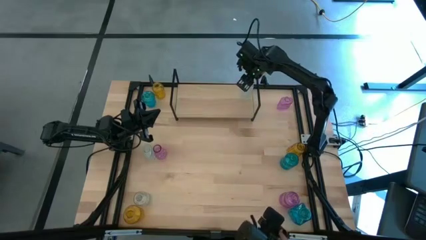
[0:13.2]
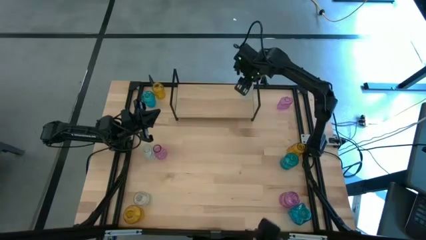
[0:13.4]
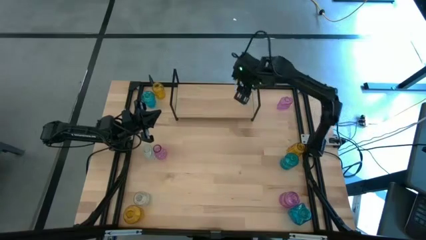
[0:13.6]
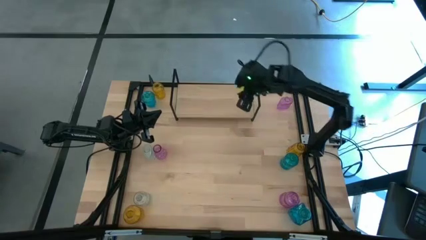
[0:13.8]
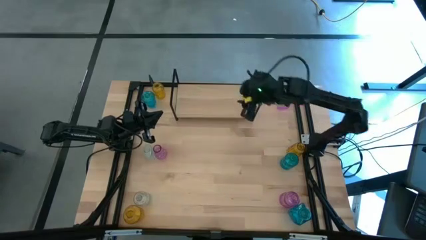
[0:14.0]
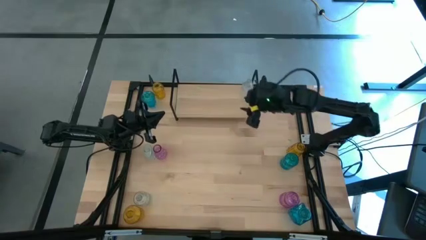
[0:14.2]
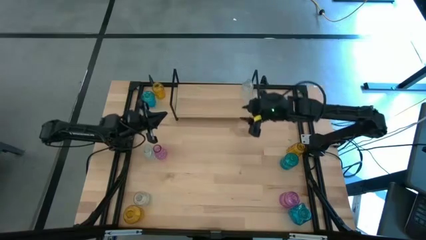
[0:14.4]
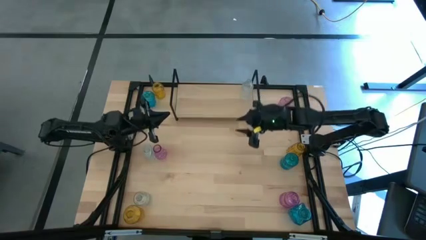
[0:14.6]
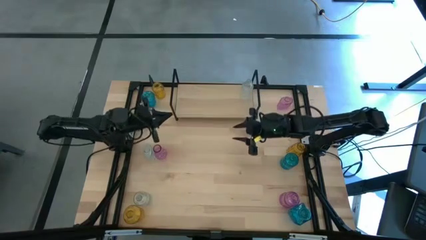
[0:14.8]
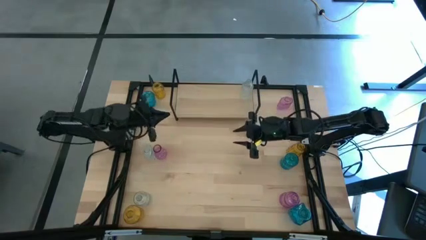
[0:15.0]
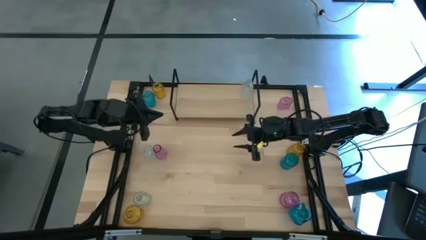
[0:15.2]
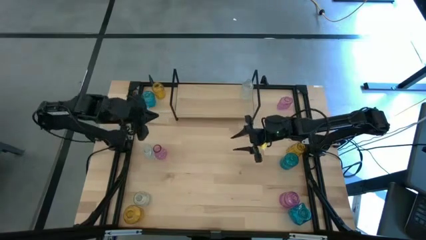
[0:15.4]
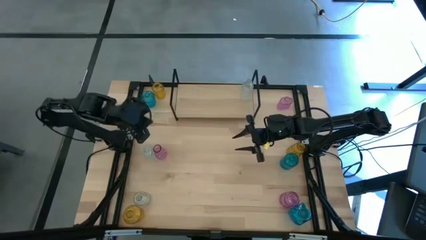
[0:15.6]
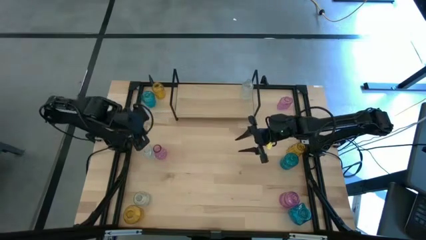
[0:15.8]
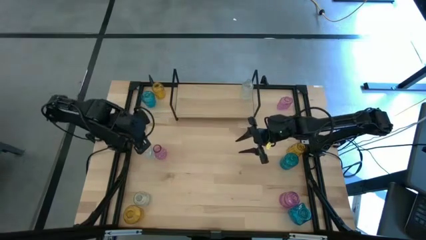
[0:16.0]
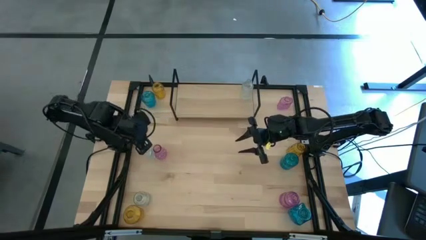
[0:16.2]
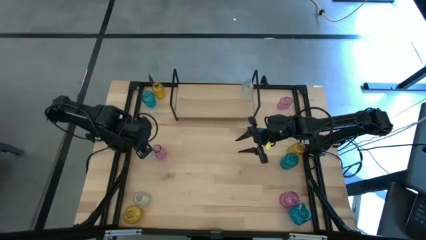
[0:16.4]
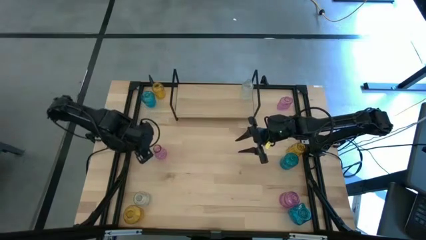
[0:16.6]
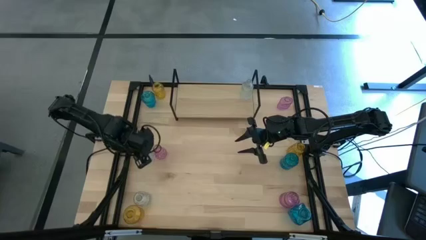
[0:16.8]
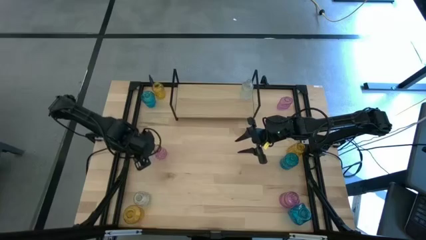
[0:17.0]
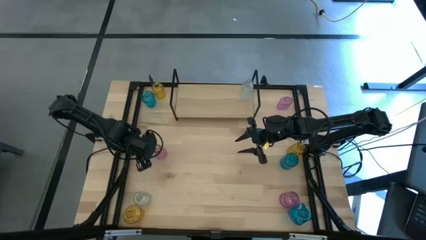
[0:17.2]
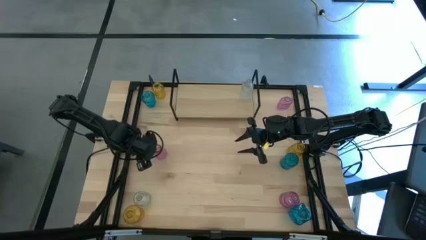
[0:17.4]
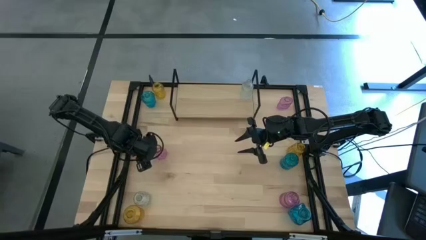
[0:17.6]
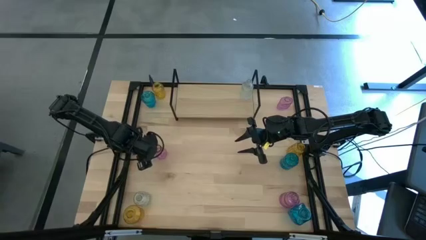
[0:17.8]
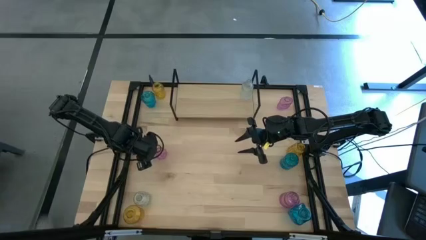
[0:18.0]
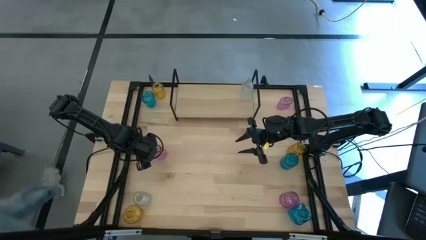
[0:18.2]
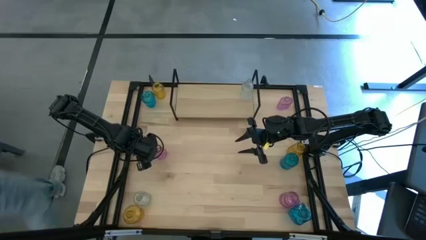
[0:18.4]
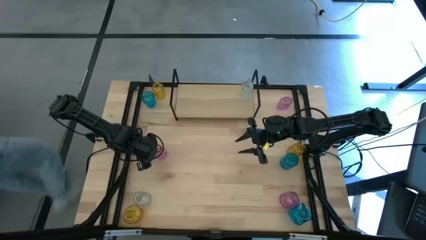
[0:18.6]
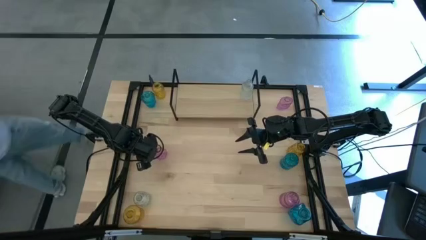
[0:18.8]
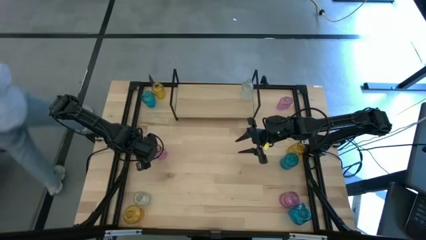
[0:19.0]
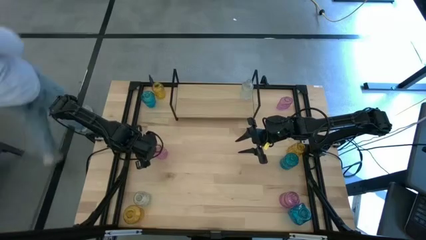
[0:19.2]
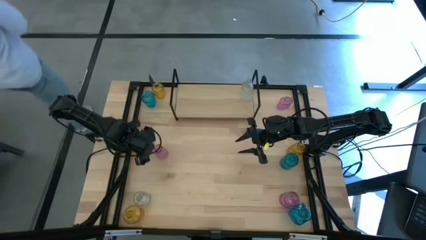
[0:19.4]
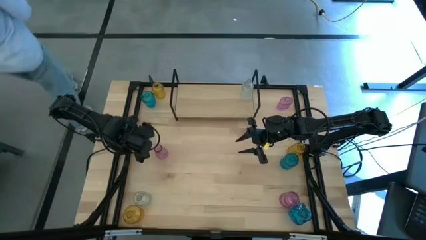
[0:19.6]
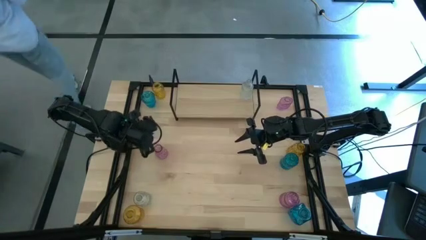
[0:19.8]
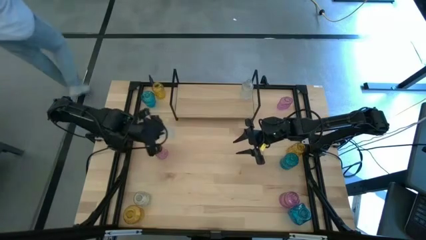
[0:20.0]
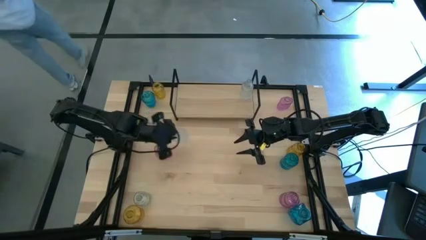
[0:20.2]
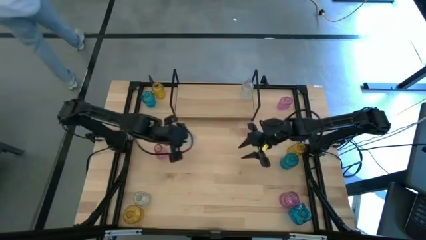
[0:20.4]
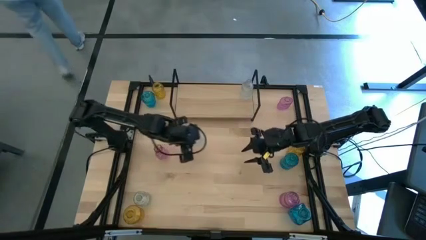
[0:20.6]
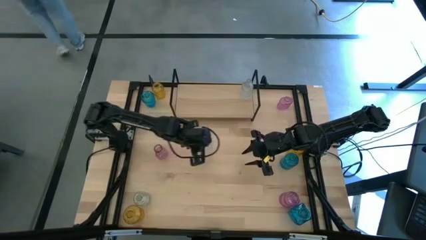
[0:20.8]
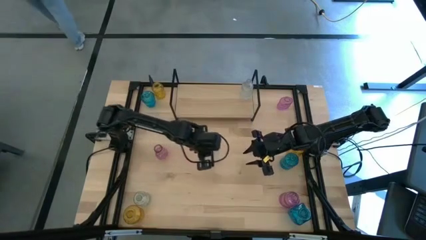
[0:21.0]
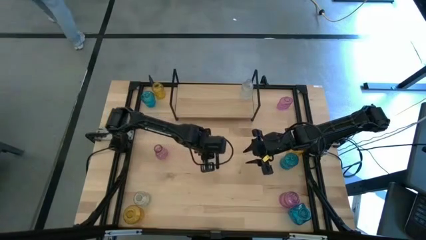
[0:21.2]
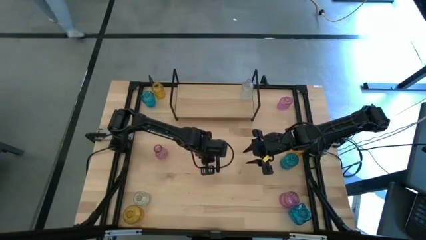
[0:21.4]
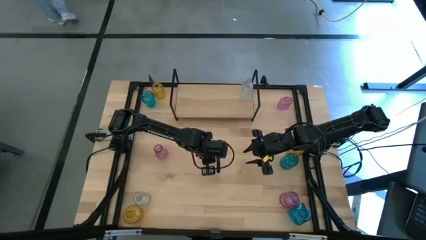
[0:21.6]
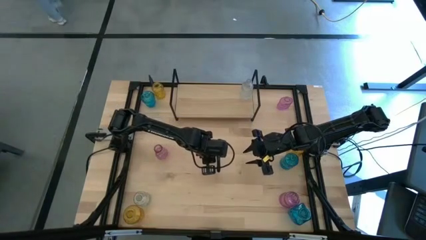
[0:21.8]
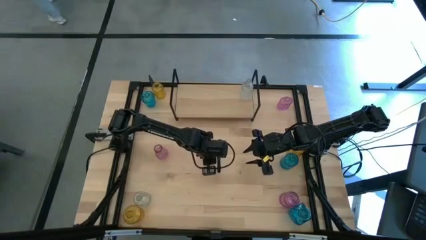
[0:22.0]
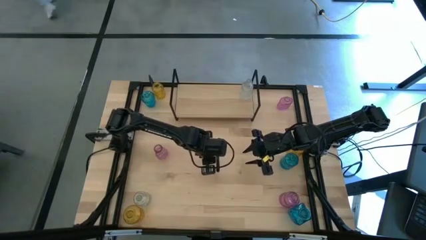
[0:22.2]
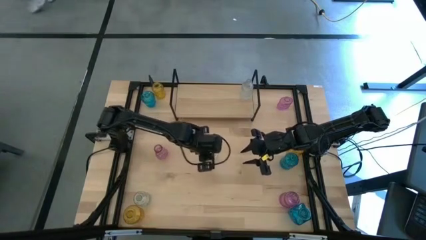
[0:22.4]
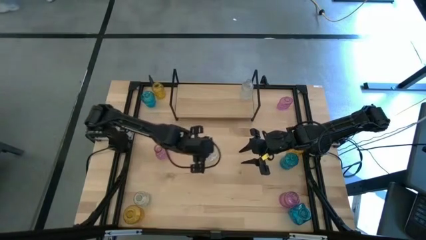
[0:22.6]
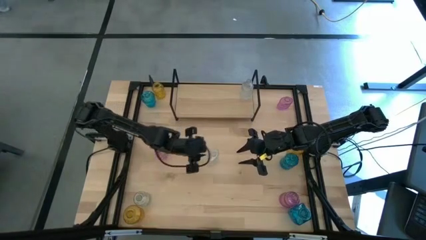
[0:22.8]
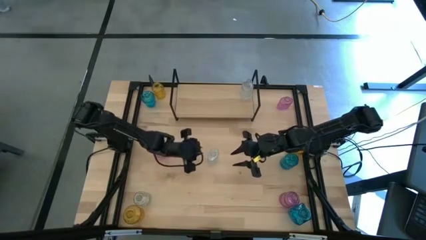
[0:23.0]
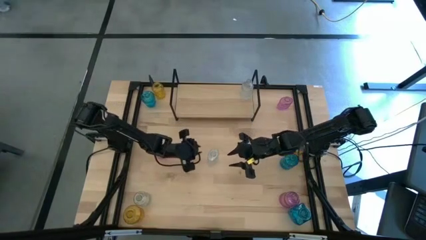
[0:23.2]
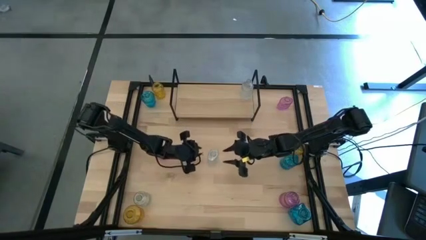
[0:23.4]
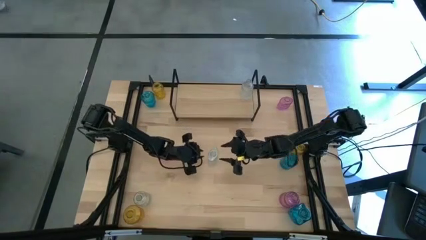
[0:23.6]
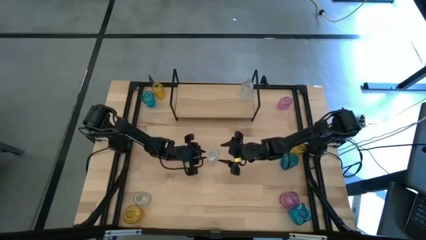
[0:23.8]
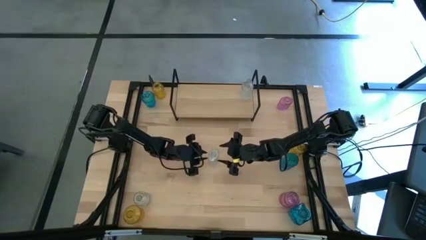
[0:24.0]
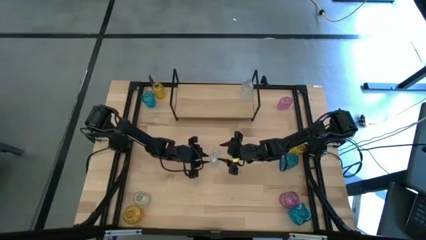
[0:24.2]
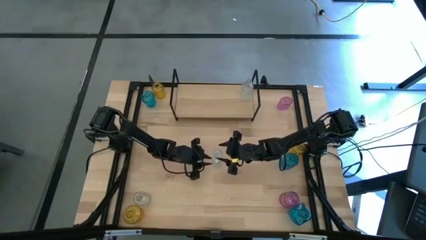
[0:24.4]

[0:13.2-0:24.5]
Task: sort vases onto shelf
Put the top transparent vase aligned with the other transparent vase on the shelf

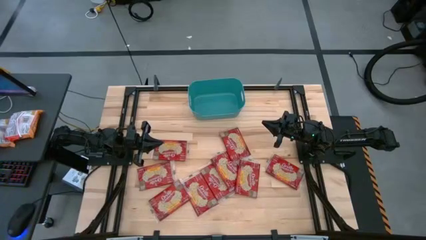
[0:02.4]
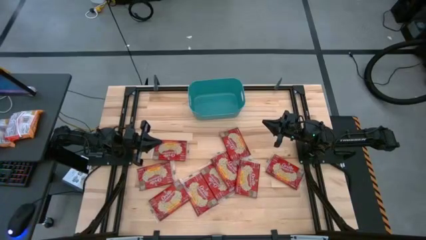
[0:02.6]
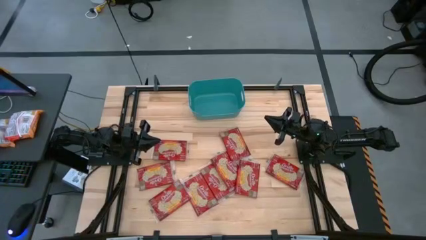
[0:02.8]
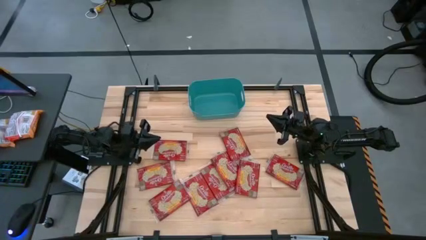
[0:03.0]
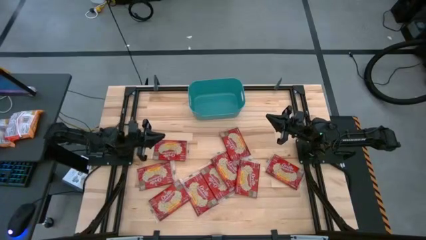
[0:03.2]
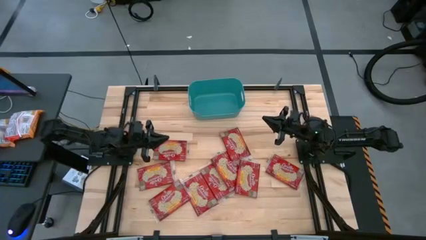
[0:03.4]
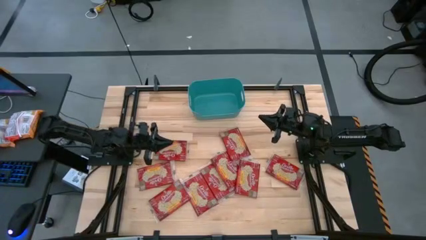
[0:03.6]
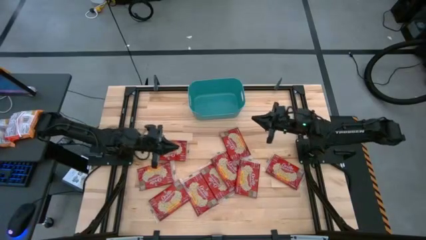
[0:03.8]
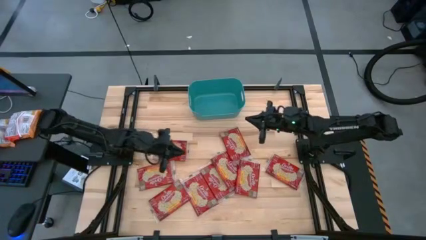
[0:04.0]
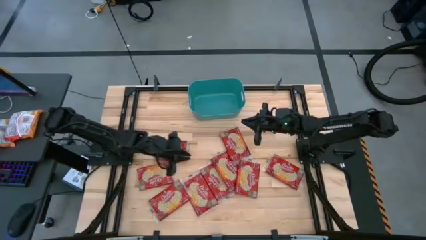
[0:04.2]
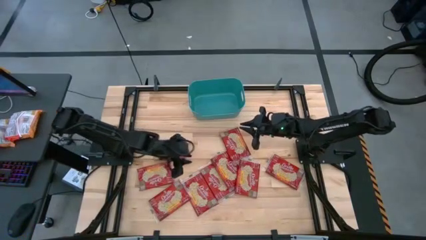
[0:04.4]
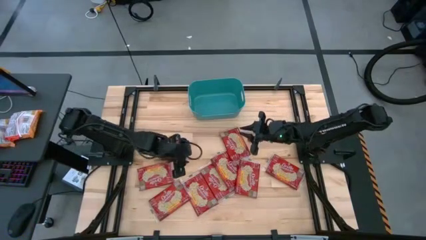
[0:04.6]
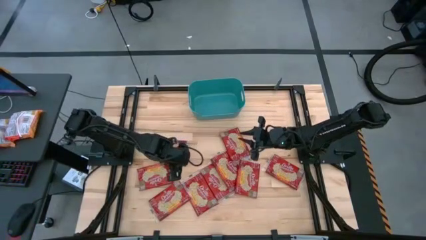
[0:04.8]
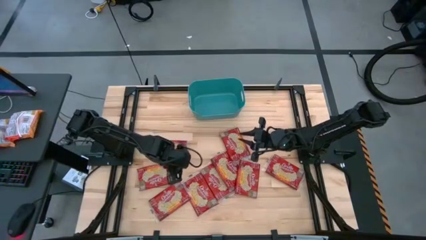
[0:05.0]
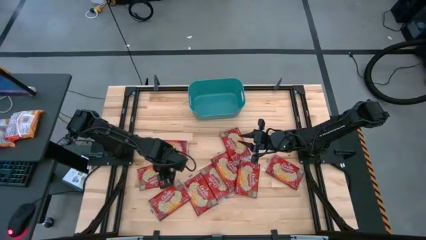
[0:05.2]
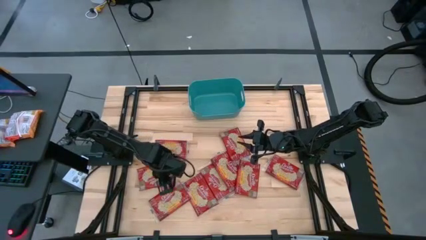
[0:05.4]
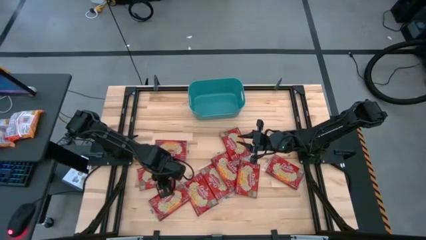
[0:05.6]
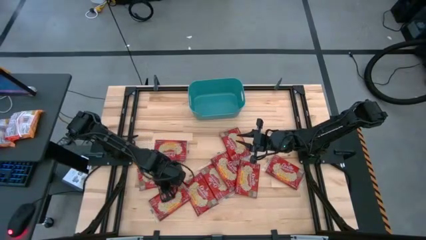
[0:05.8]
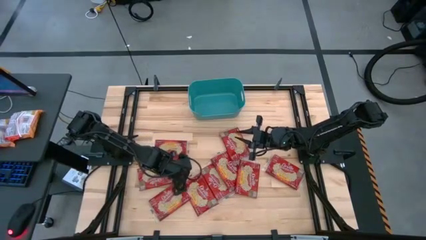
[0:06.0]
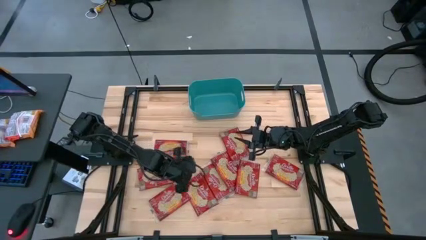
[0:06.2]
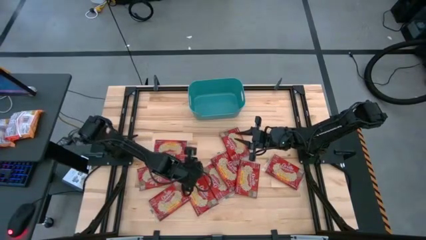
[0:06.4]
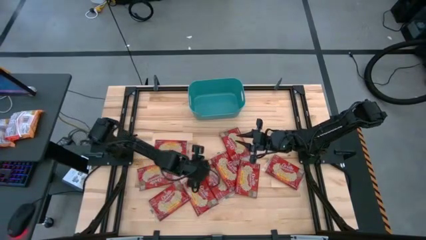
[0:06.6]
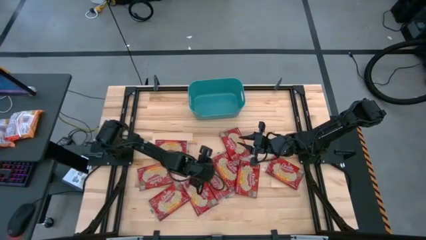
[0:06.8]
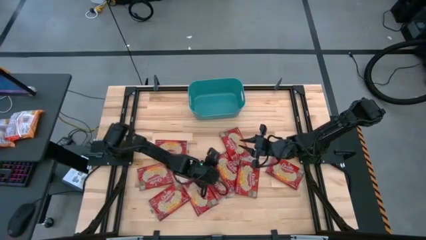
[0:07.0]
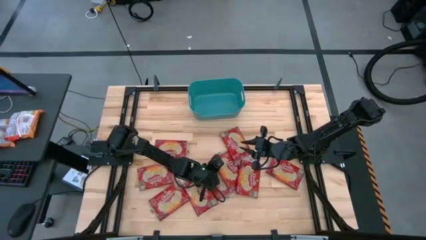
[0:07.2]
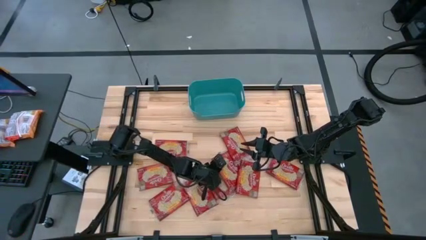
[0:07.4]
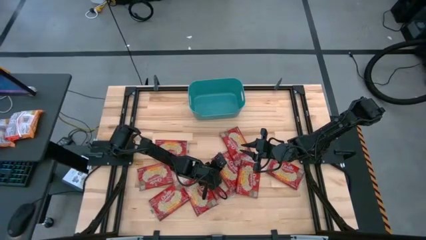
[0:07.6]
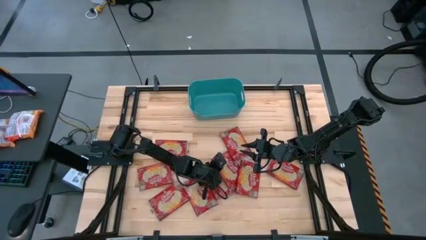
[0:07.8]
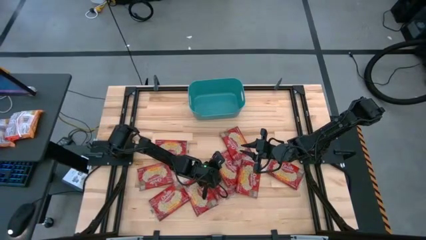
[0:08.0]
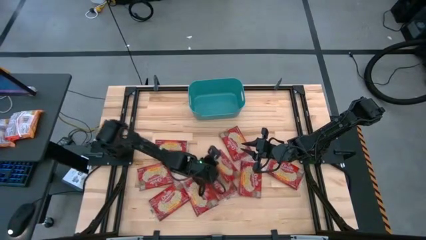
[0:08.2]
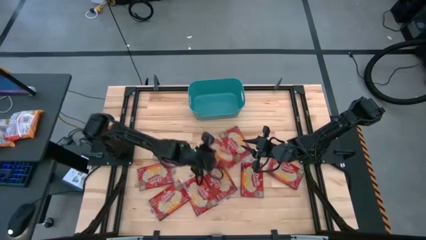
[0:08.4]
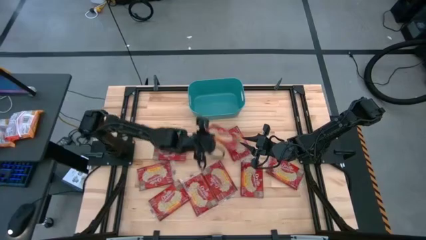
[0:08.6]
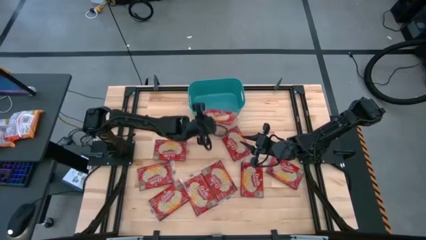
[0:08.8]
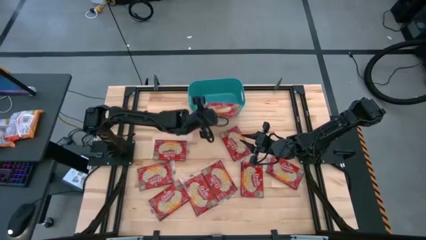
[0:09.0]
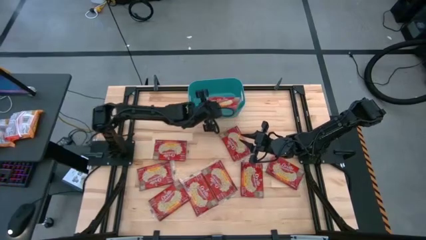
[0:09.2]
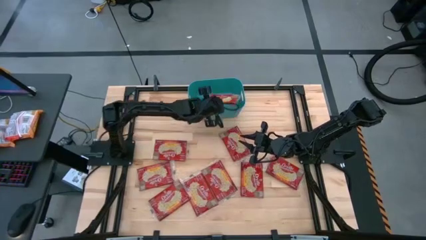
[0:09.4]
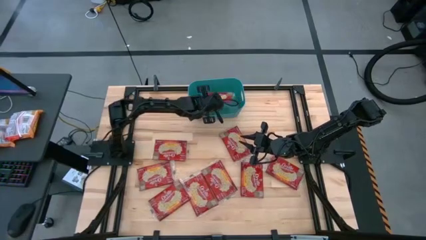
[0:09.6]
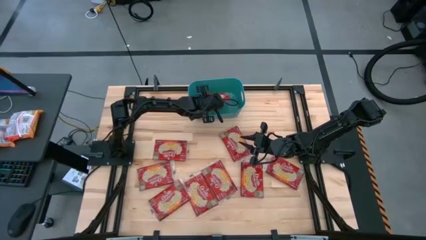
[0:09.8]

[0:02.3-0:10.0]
Task: Sort popcorn bags into baskets
Put the red popcorn bag into the bin
